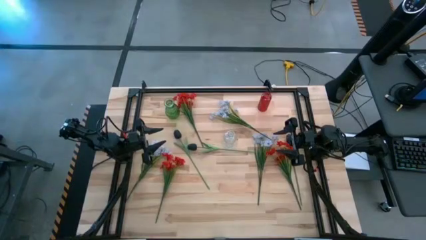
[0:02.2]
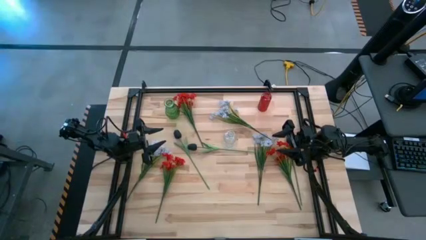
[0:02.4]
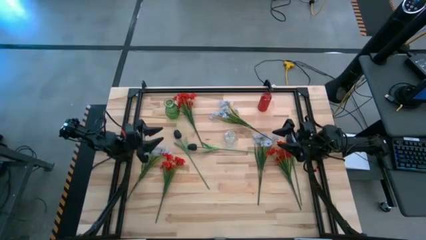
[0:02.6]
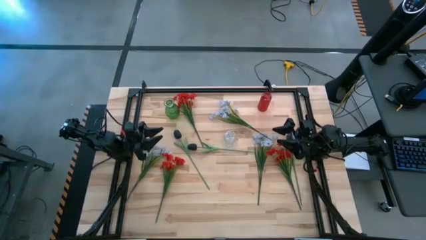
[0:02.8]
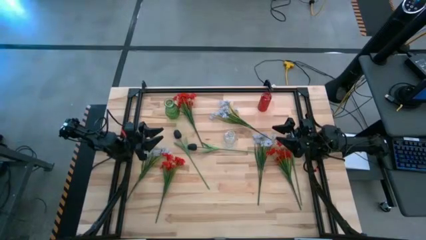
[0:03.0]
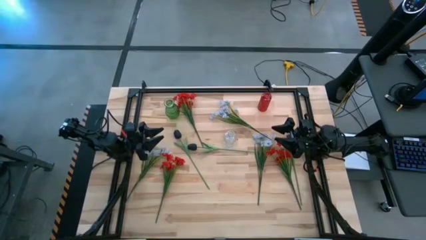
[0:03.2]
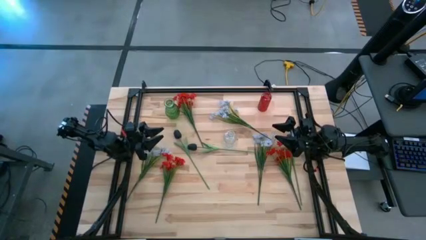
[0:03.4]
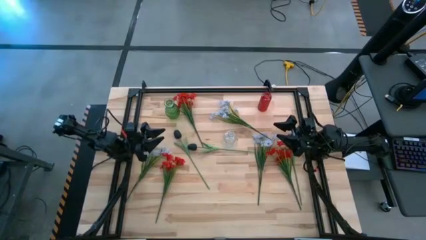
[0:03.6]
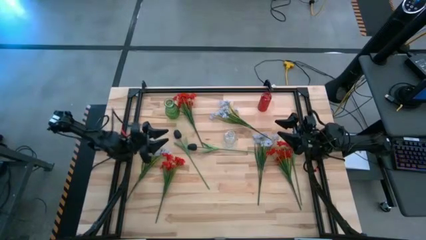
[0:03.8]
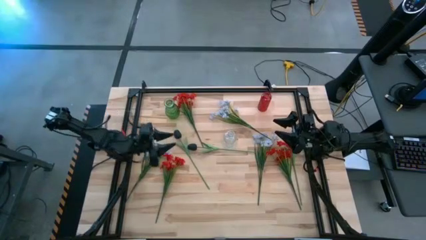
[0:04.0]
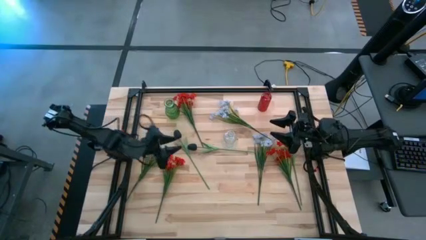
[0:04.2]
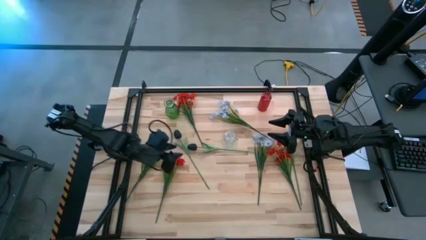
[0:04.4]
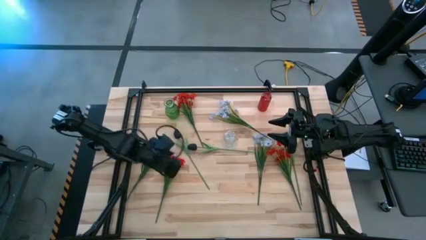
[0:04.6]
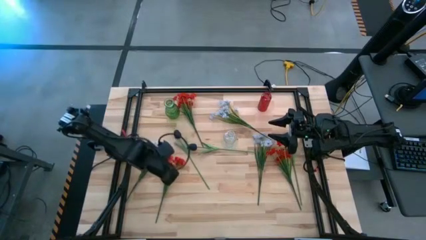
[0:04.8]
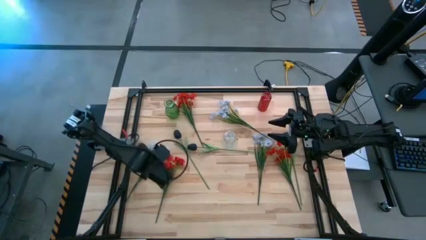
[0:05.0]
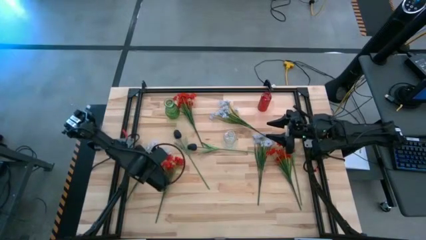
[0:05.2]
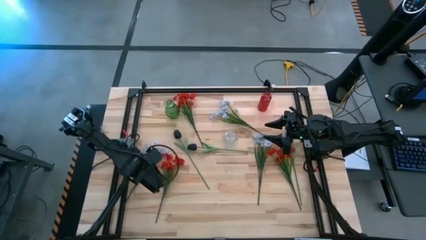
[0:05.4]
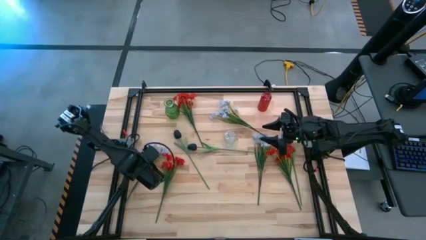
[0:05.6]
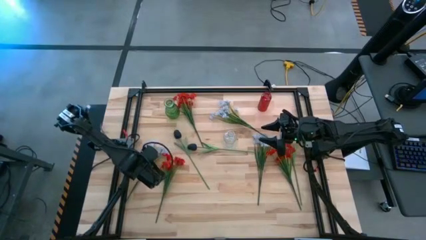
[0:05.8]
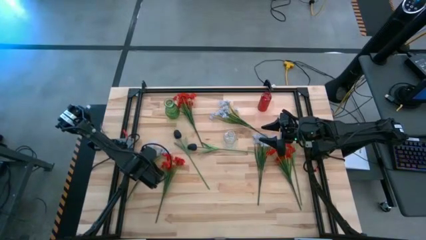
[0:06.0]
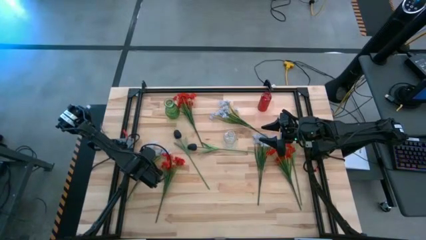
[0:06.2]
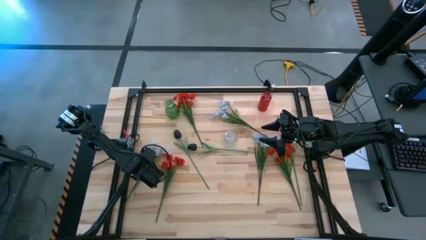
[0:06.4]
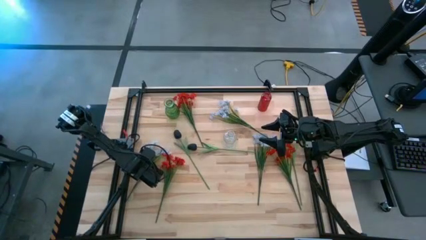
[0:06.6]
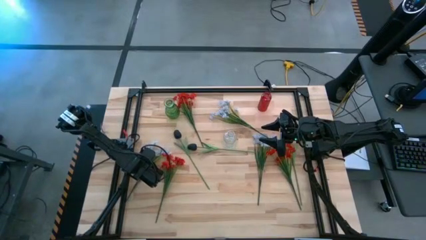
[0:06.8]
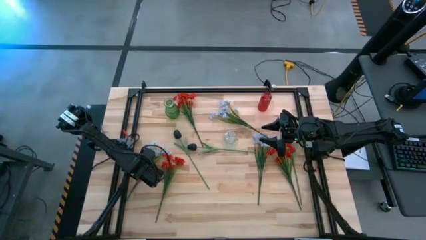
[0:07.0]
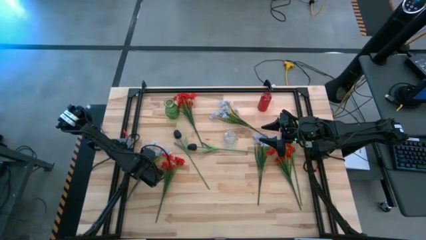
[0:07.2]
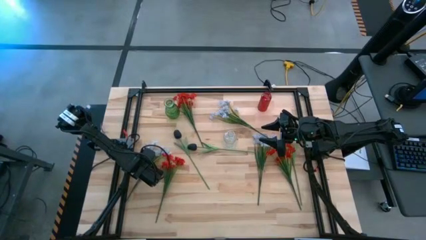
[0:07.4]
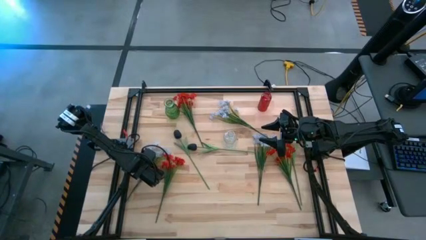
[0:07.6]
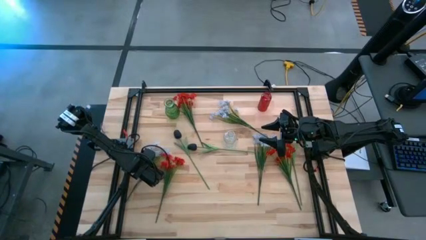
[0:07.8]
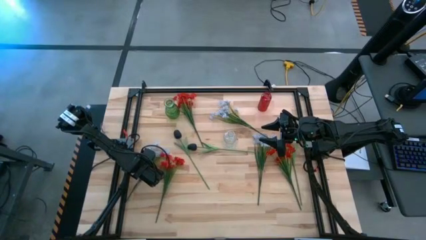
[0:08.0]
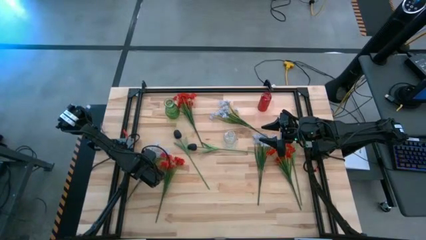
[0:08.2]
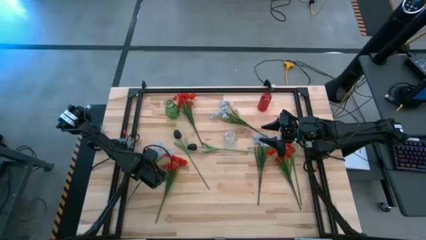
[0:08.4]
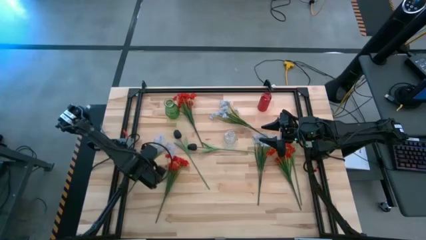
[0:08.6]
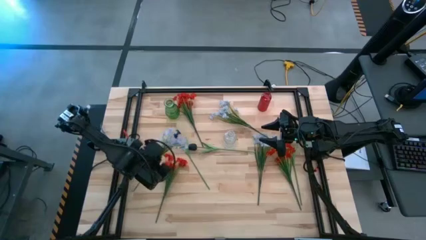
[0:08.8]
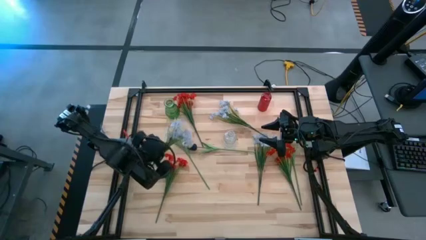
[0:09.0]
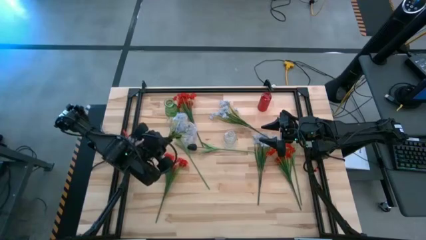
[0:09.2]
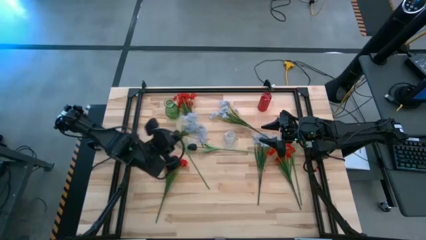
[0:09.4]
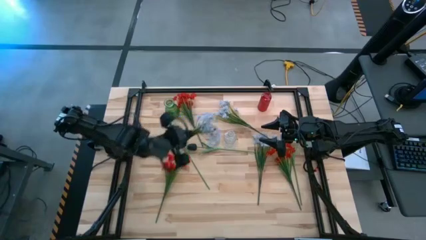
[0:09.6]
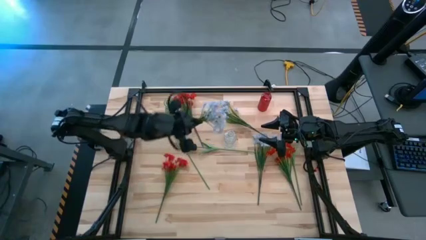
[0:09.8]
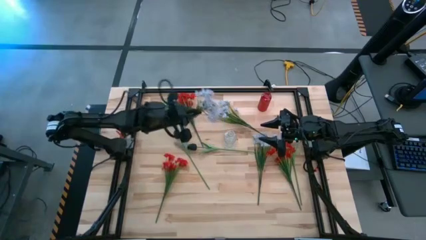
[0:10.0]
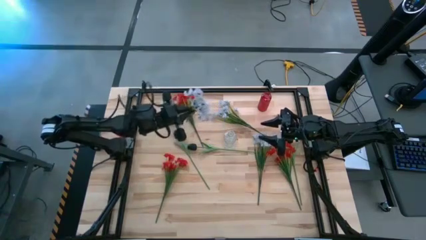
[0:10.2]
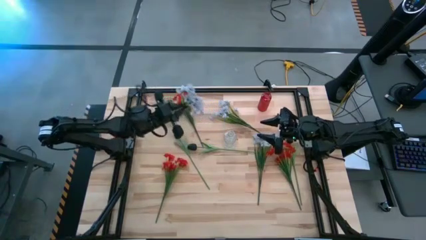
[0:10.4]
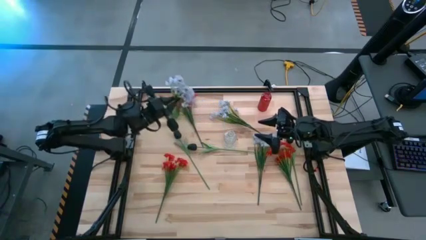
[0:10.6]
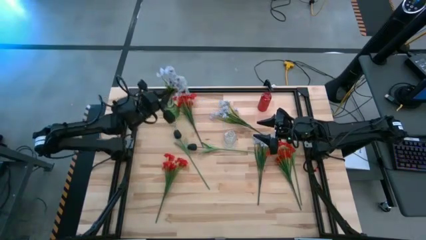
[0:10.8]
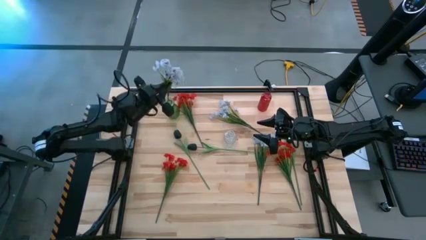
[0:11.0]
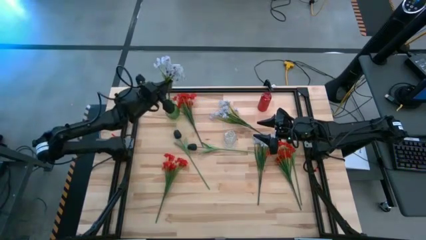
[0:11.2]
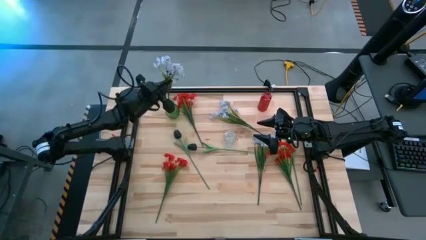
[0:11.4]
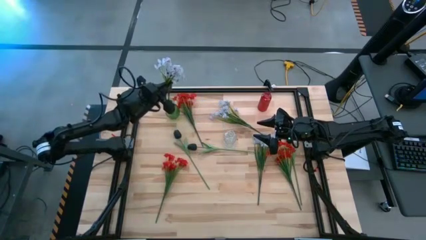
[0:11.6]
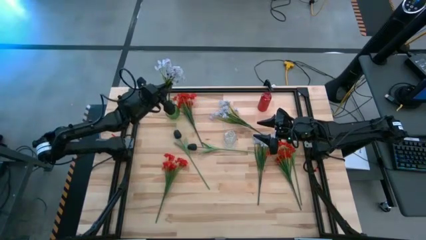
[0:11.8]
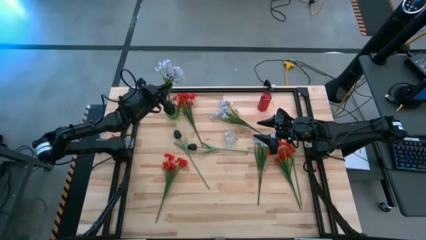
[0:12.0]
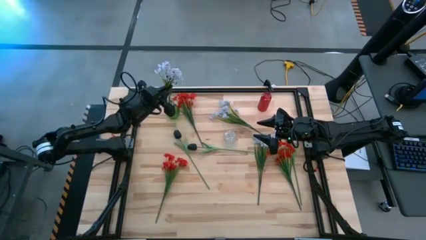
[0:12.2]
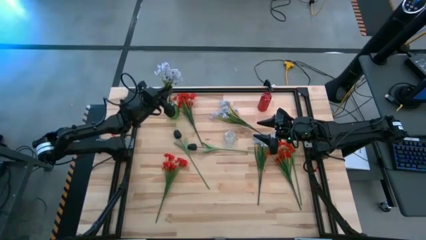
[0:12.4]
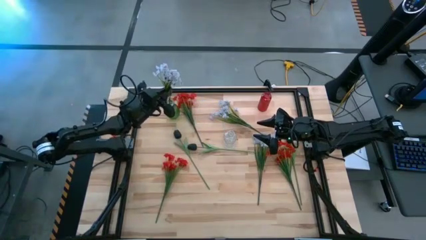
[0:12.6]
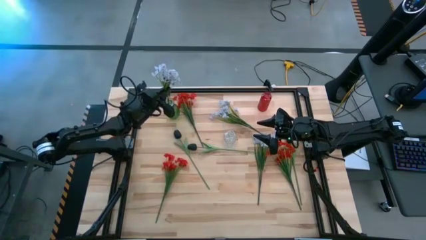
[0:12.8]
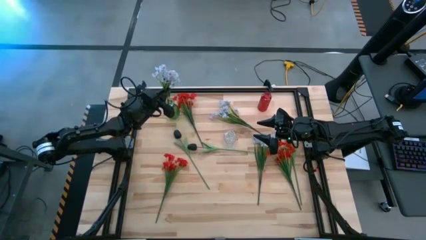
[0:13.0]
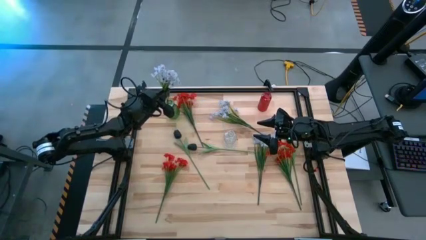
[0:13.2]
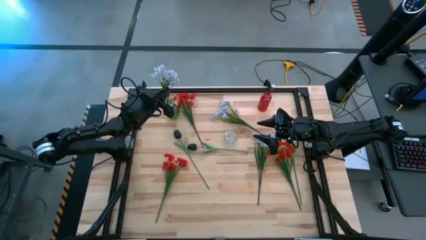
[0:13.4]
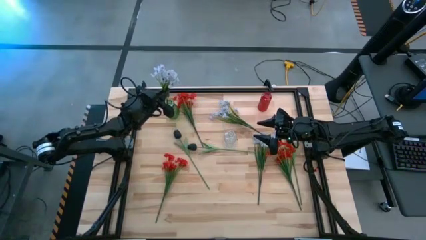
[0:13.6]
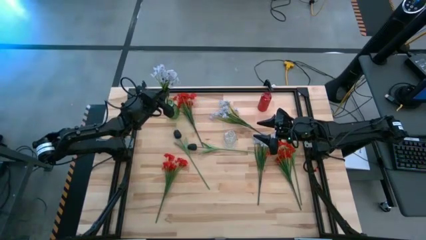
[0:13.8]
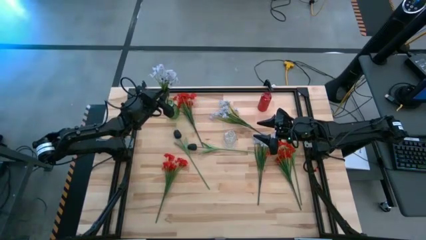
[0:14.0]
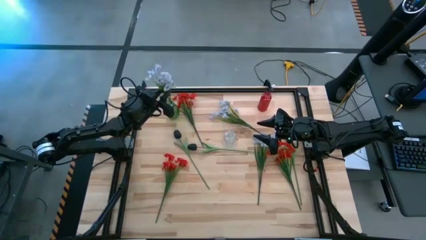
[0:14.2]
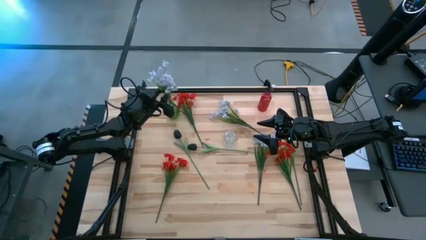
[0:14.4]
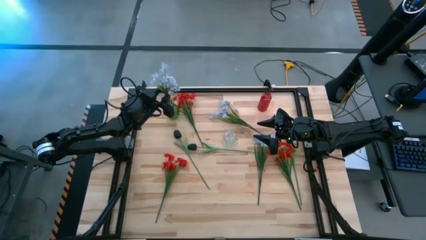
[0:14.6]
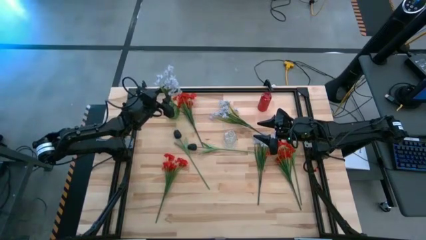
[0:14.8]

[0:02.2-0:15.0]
Task: Sort flowers into vase by color
Put the left white flower into the green vase
